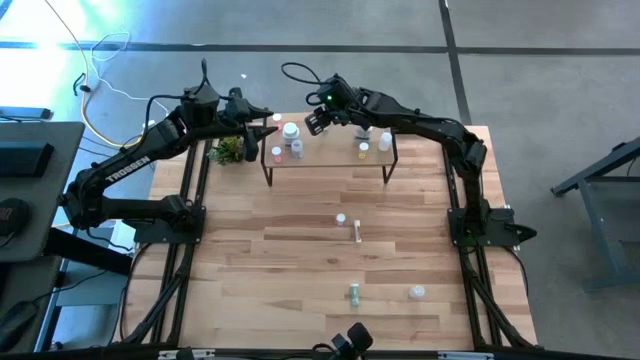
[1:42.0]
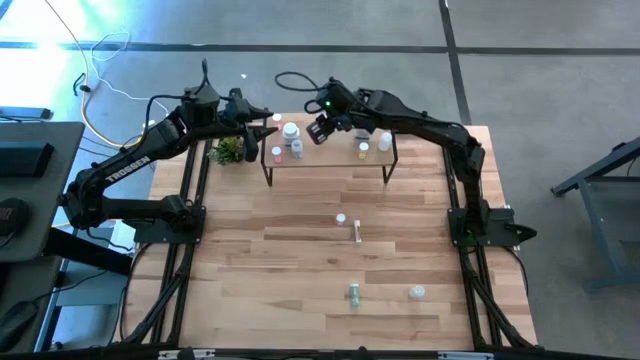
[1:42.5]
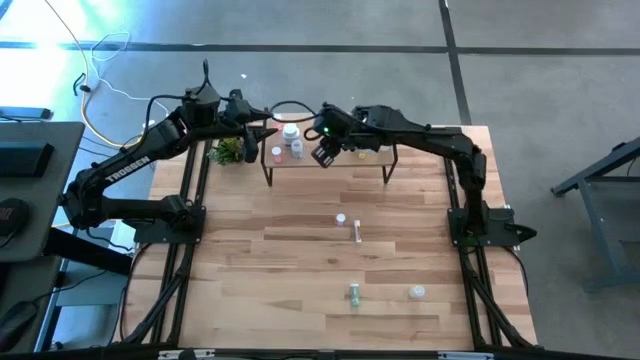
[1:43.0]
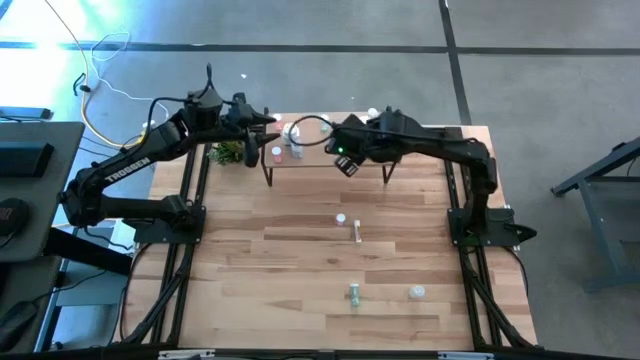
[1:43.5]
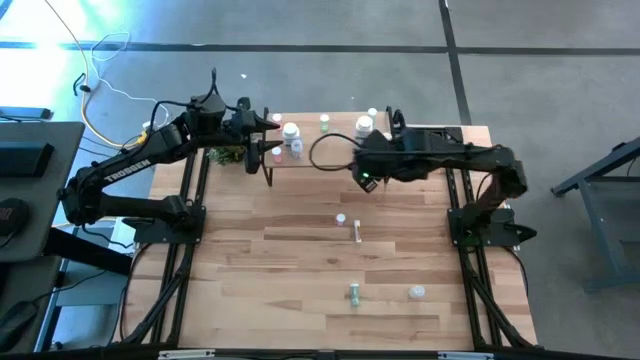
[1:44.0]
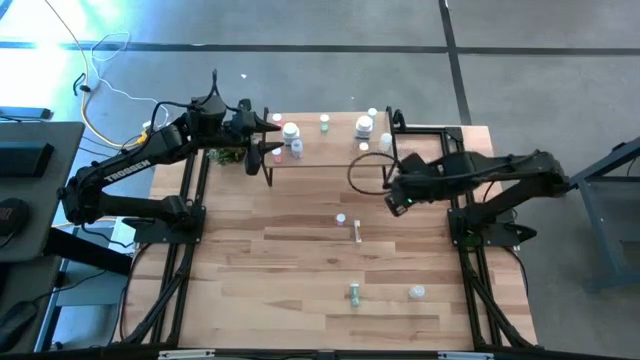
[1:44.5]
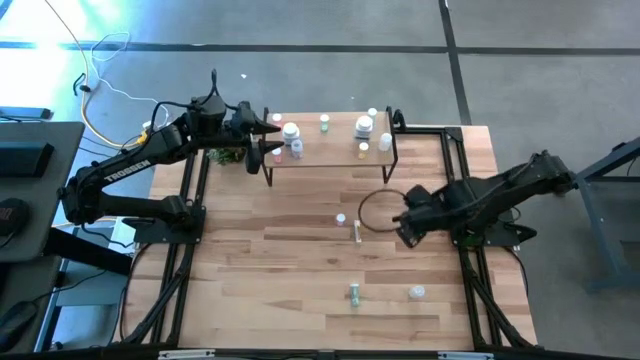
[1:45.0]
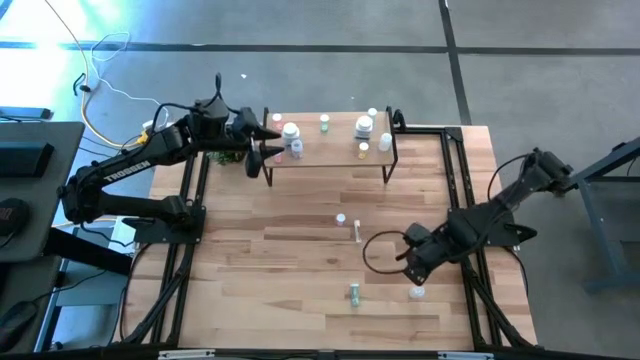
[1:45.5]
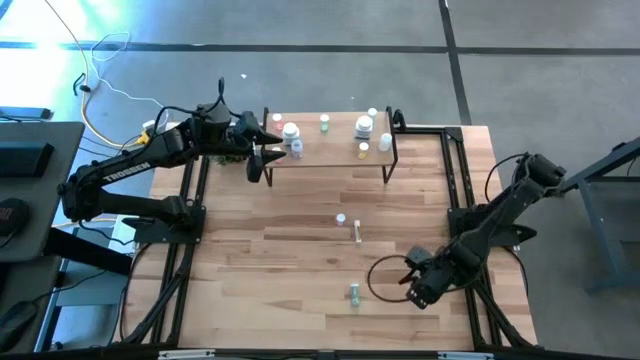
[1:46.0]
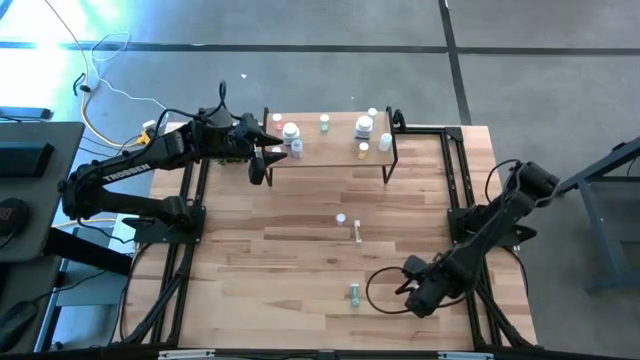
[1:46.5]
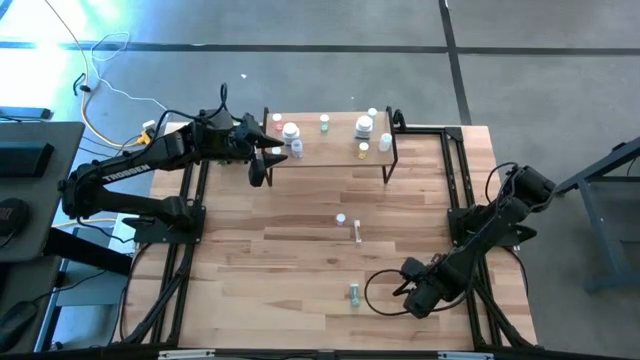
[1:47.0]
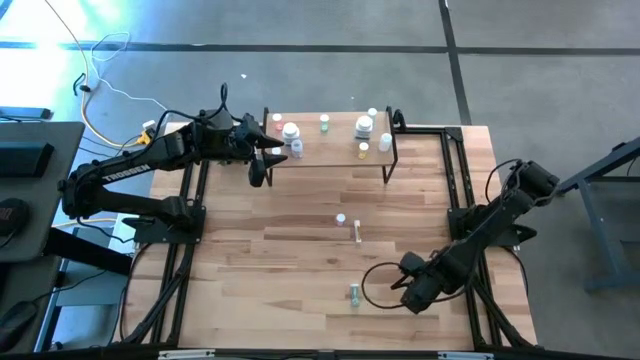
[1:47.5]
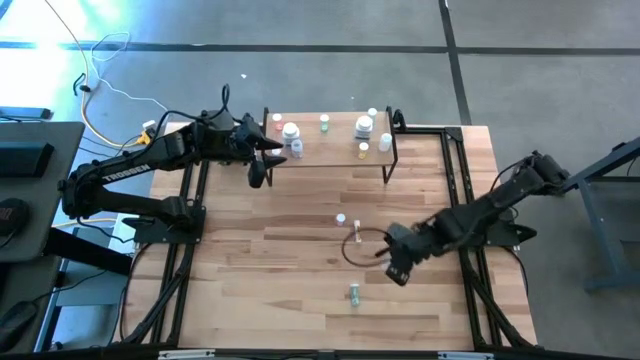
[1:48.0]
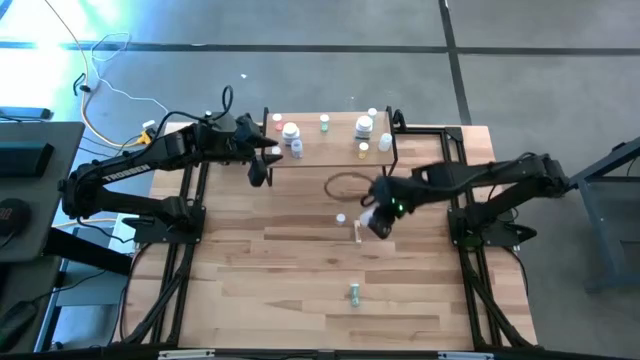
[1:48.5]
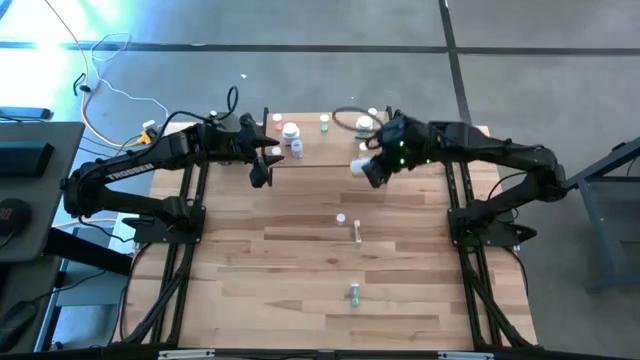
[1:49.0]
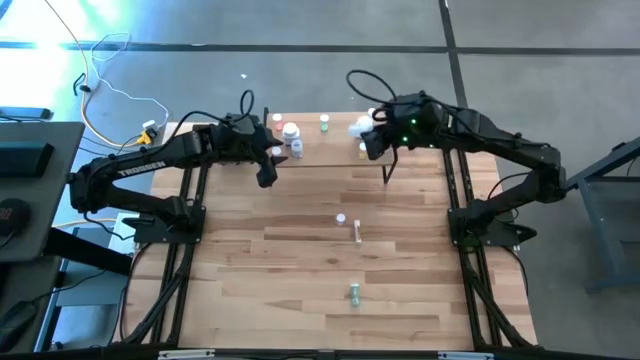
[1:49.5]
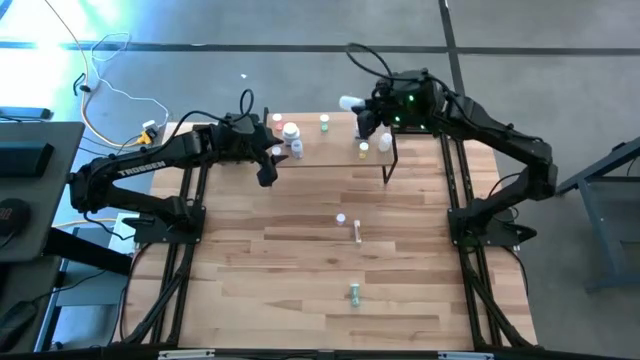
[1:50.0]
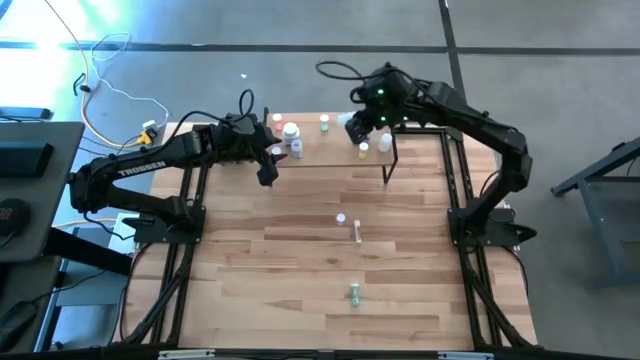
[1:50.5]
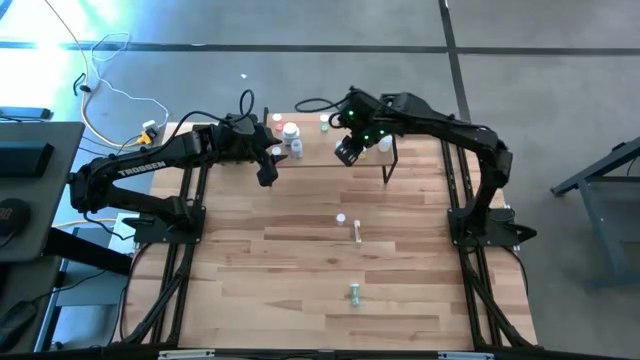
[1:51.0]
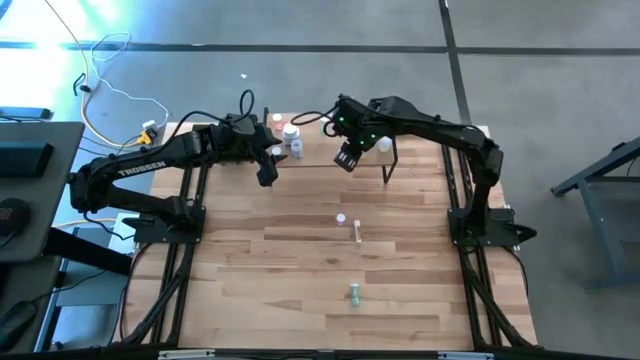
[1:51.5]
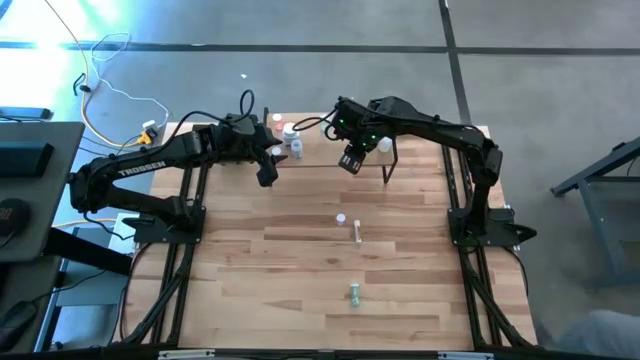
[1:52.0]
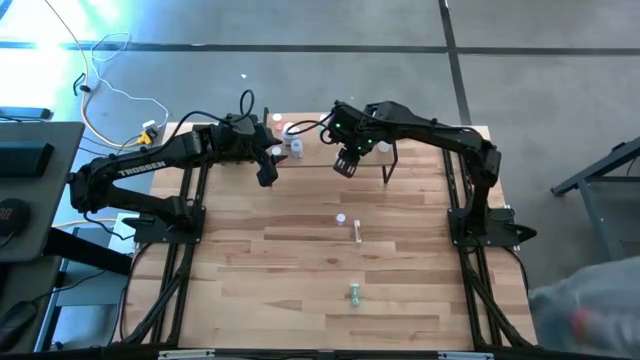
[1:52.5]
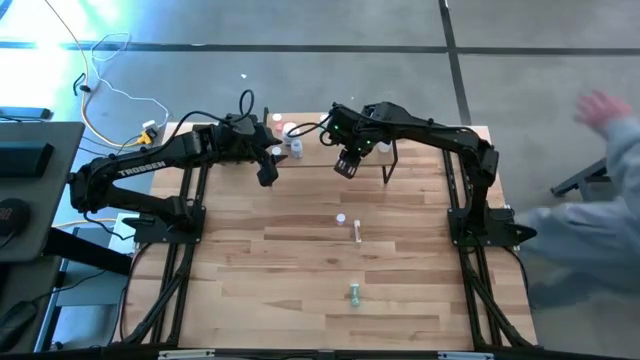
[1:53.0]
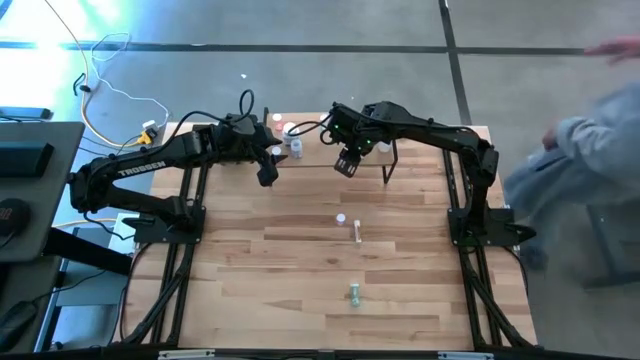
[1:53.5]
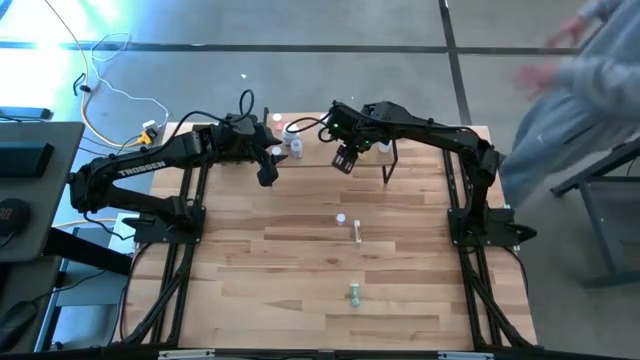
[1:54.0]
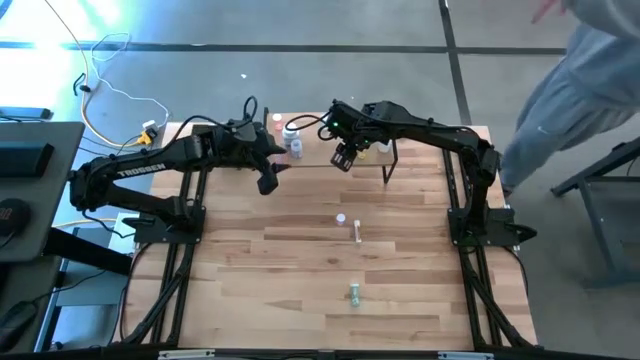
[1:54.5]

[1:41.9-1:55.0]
Task: Pick and place medicine bottles onto shelf by color
Put the transparent pill bottle on the shelf

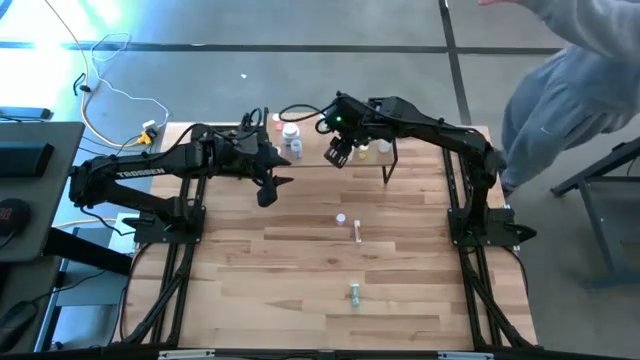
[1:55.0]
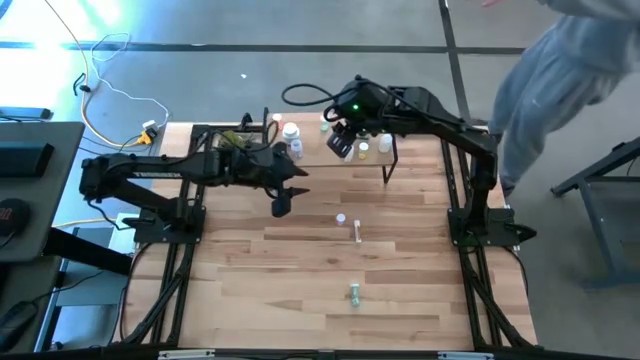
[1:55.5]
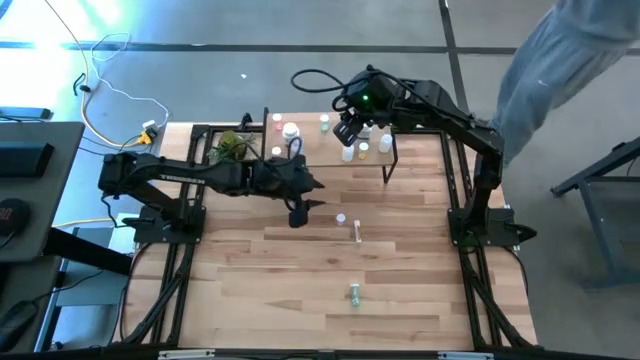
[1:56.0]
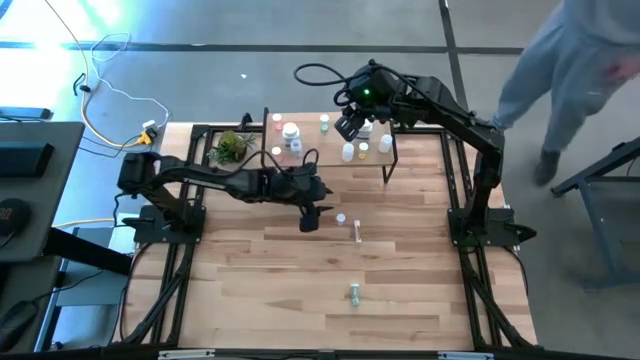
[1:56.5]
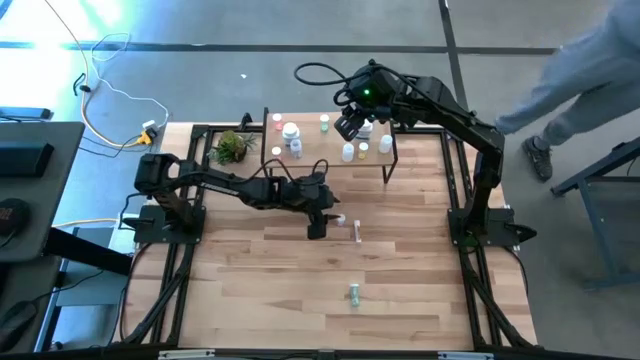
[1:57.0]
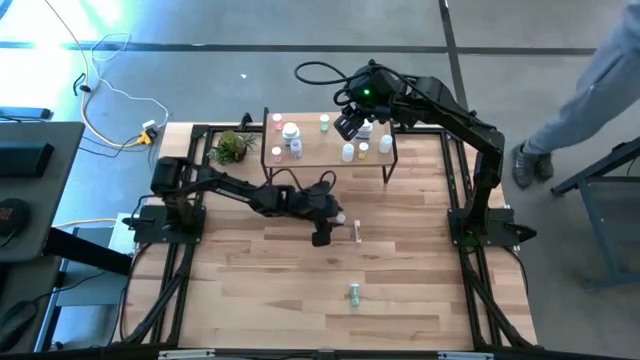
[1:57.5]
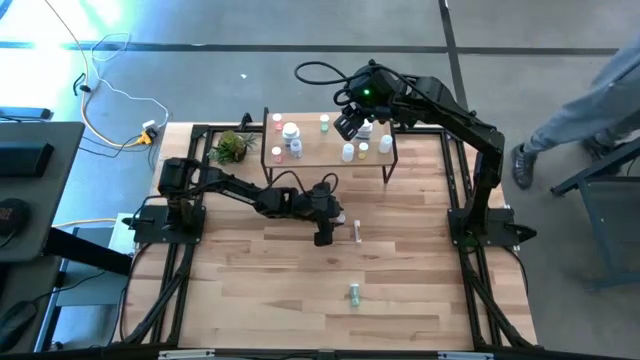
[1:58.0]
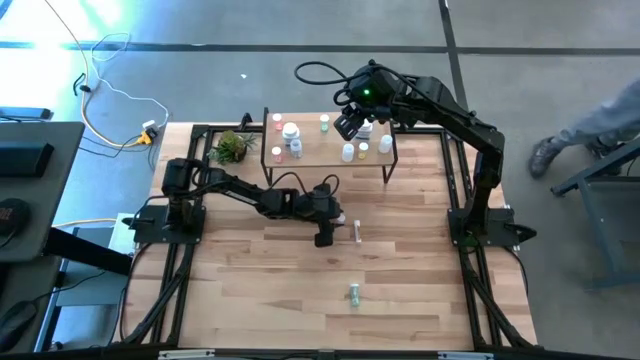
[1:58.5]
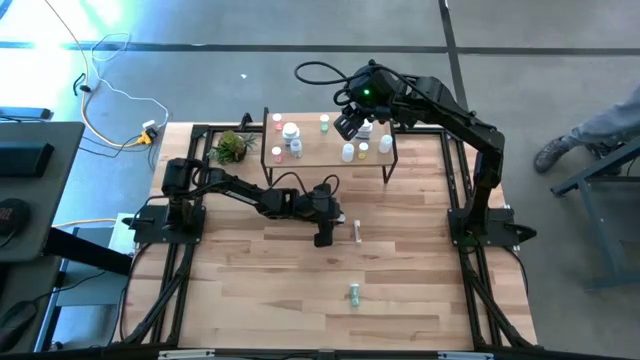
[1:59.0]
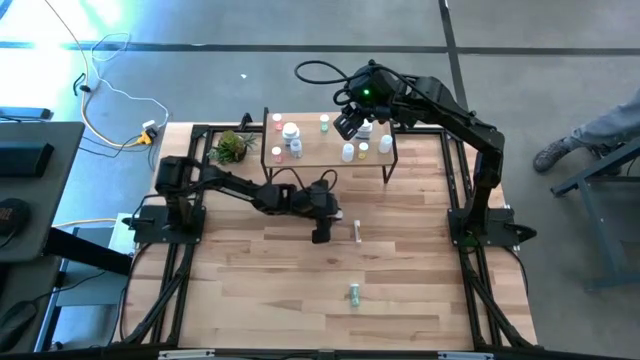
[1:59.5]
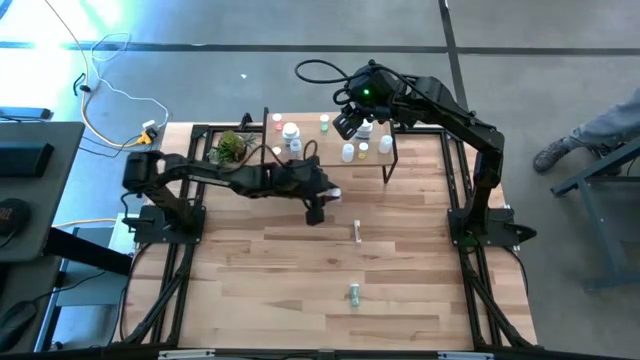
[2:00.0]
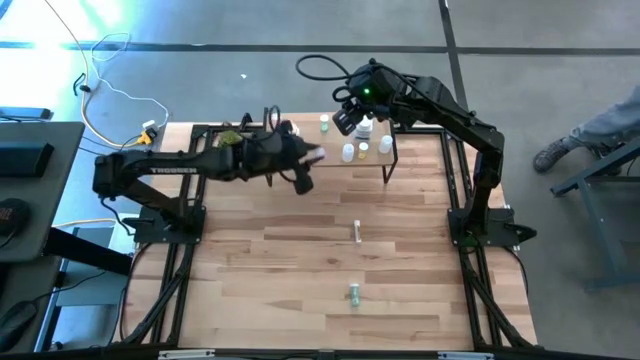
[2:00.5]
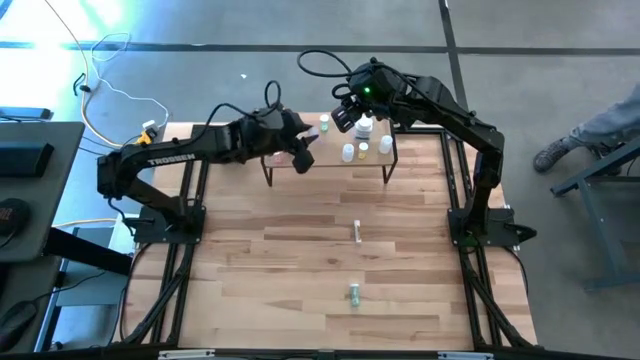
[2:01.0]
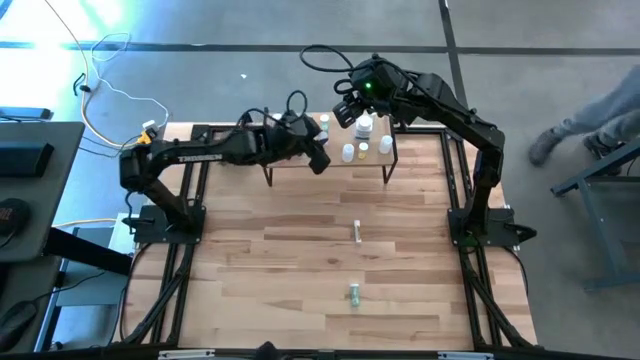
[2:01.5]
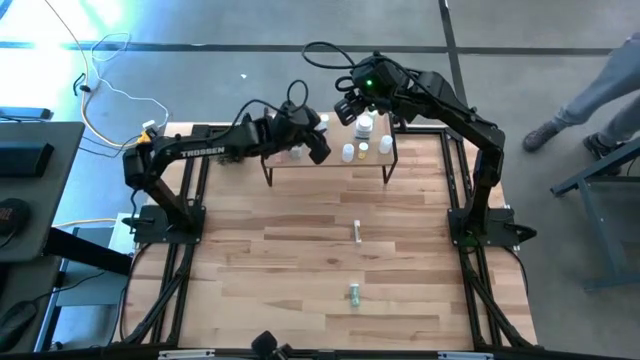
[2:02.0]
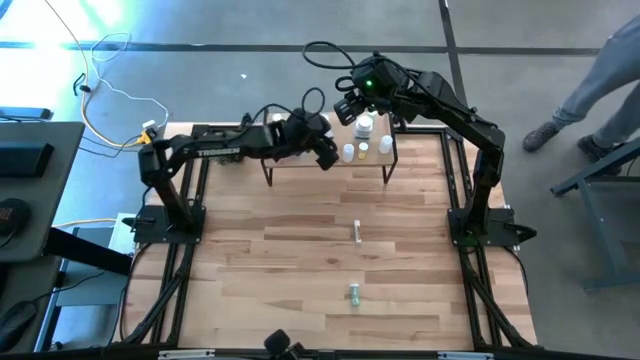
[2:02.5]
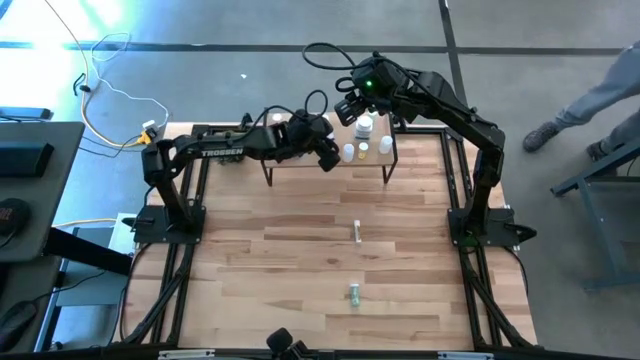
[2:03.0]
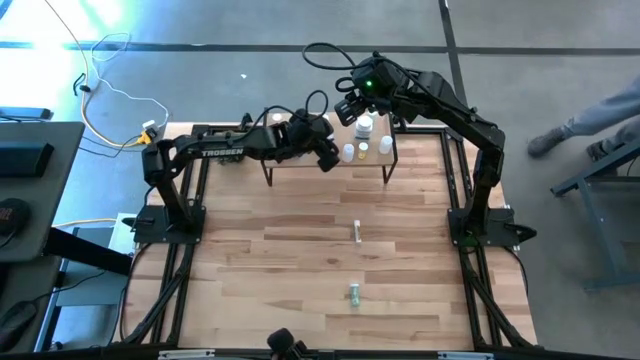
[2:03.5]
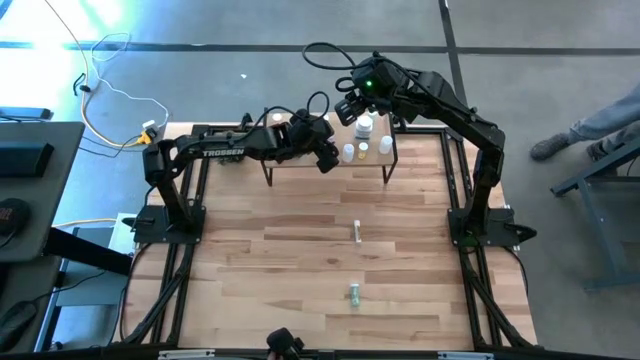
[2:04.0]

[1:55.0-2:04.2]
Put the pink pill bottle on the shelf
